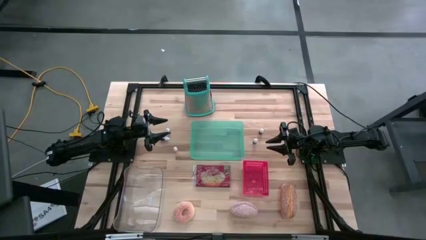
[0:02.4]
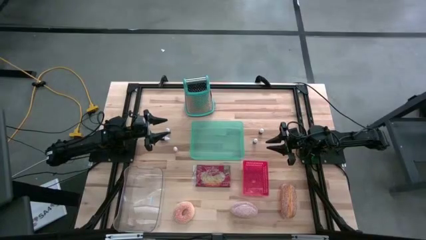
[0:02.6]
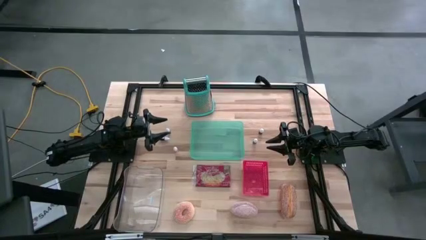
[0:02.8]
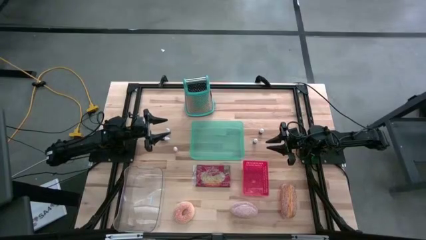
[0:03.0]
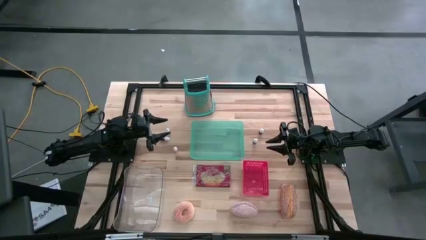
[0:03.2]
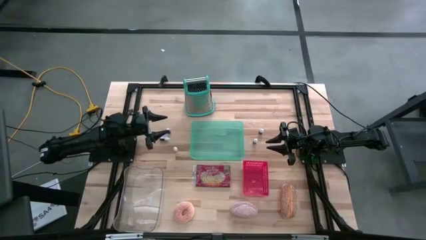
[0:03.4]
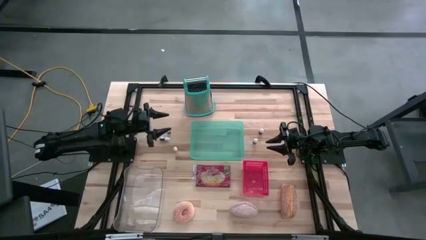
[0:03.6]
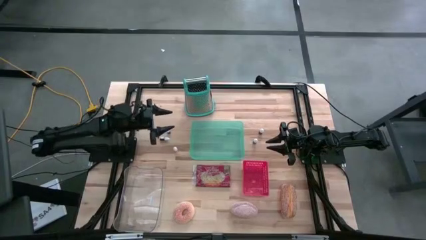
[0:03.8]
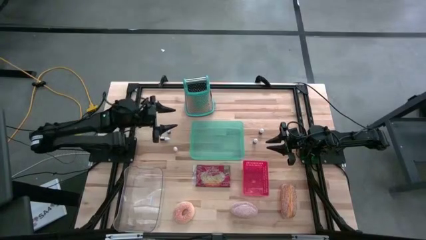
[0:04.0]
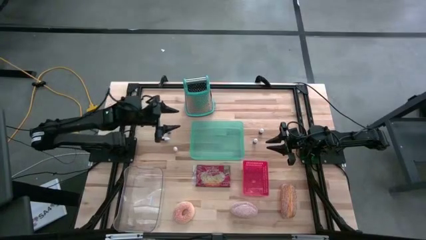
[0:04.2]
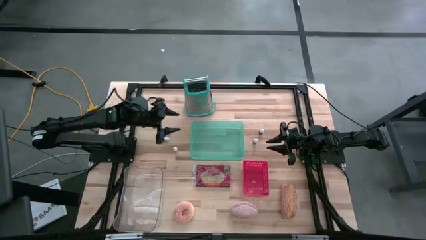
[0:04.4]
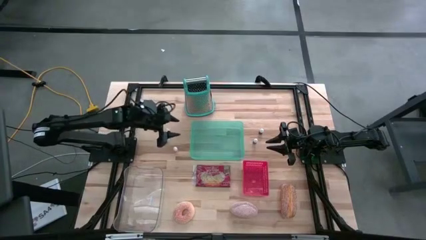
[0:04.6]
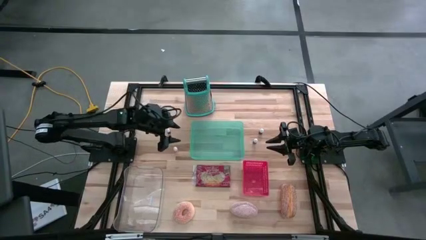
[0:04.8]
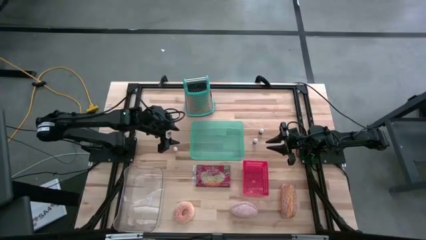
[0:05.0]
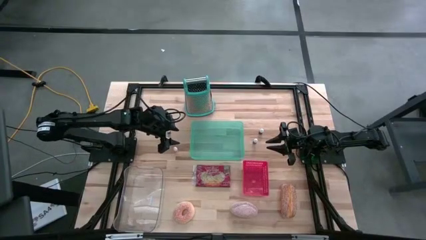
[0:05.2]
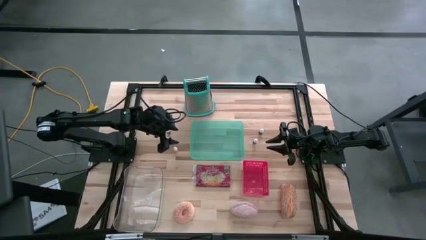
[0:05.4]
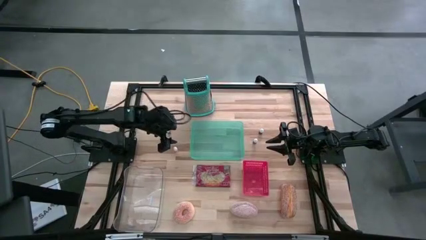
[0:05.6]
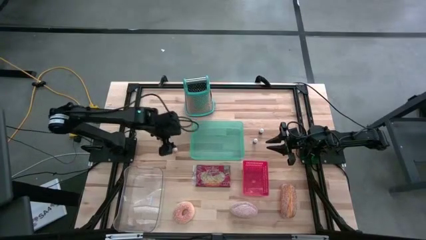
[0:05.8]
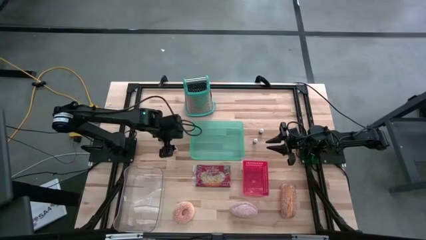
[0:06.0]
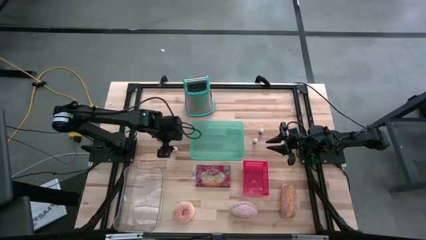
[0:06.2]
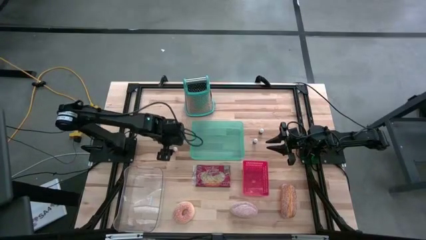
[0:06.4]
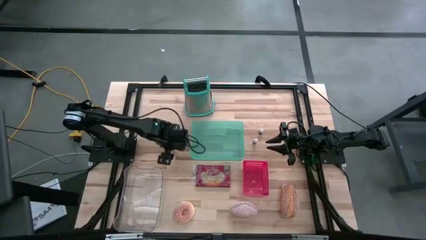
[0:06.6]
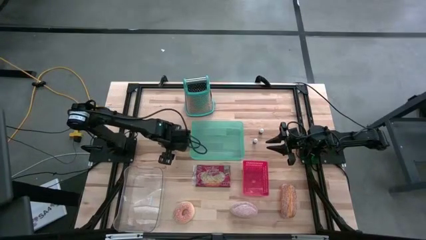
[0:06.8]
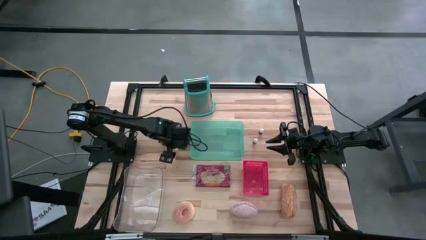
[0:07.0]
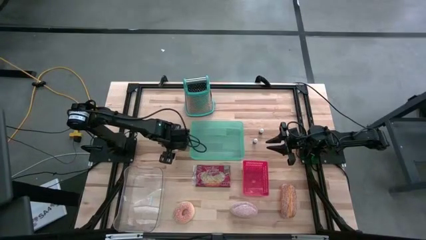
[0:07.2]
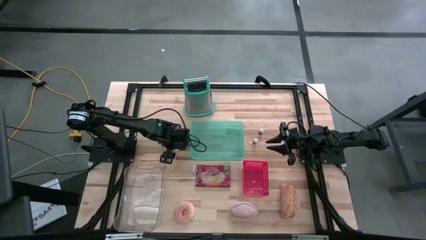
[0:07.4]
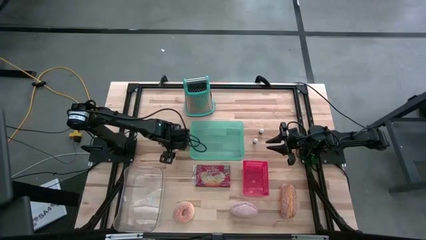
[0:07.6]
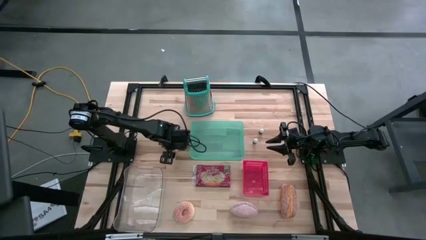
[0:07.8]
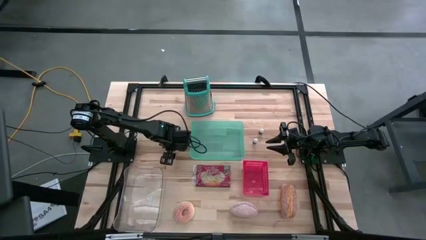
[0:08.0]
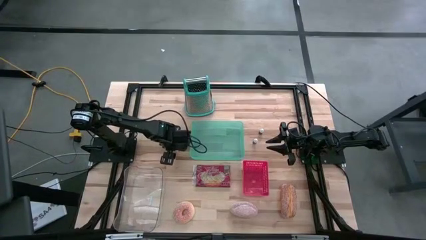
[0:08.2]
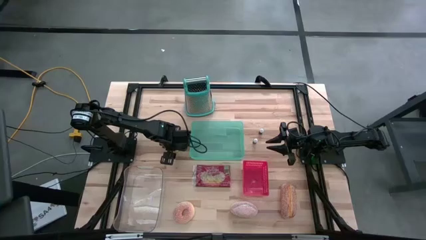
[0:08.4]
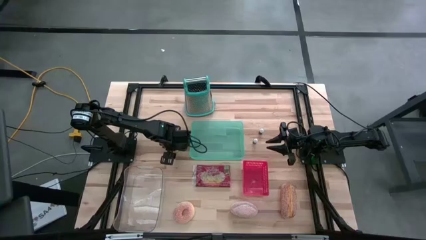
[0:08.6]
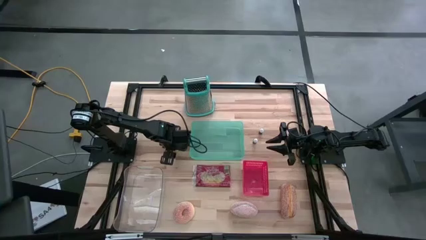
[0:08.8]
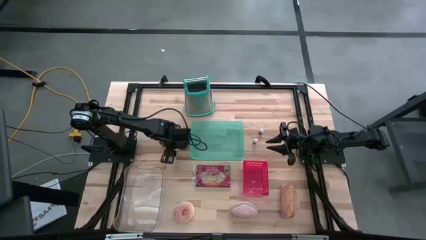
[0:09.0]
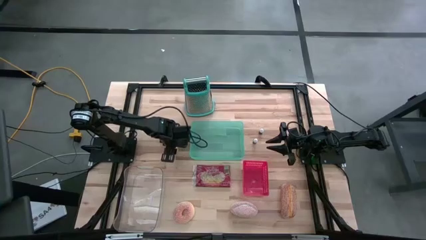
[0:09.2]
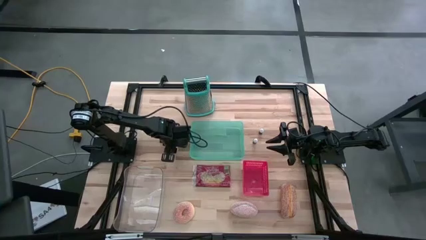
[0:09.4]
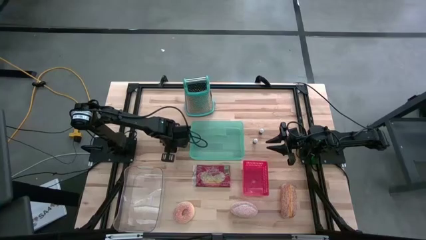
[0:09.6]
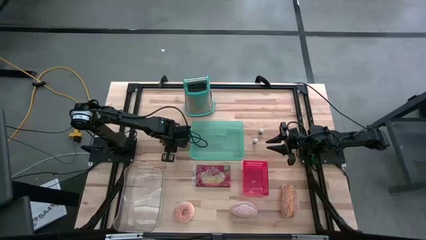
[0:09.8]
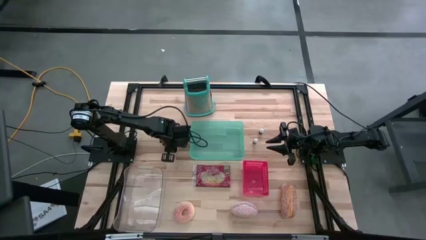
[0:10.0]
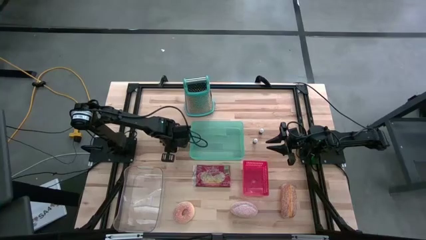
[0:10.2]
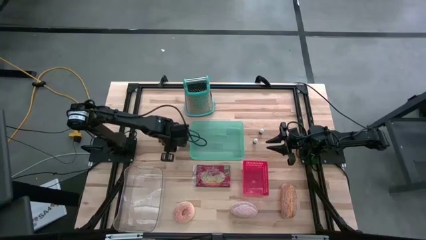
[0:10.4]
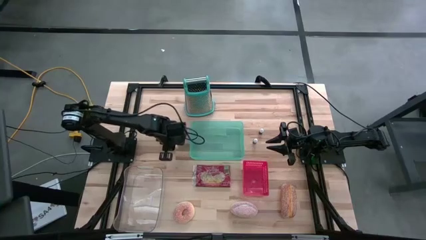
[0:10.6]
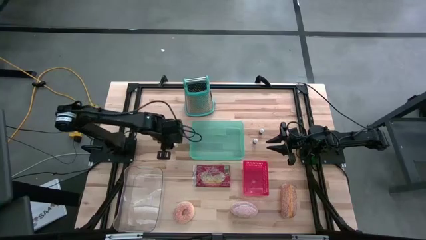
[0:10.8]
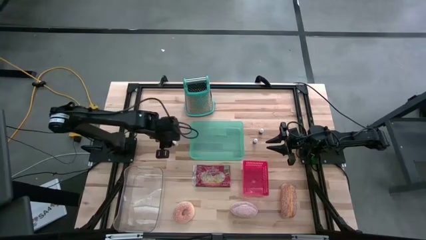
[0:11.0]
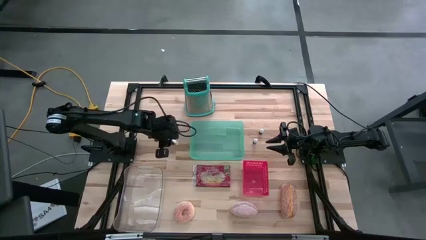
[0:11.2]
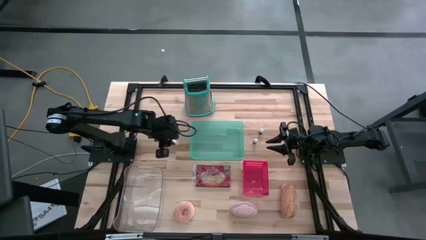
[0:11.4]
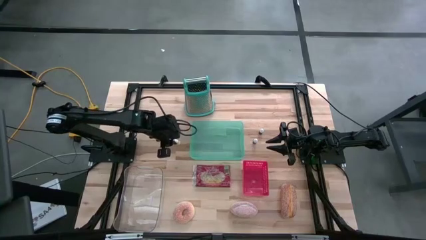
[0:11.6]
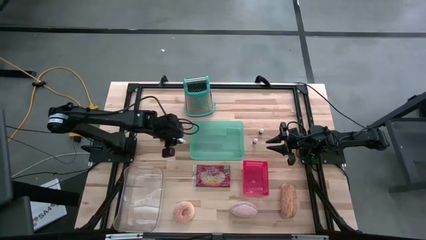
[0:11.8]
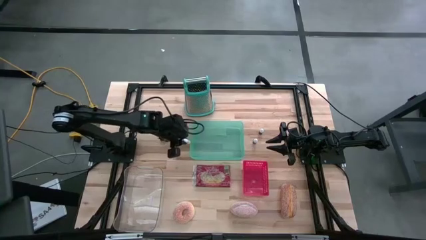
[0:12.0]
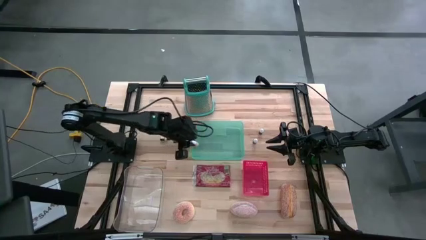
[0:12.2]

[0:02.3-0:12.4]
Task: Pick & Place Food Item
Put the orange food coloring bottle into the red bin

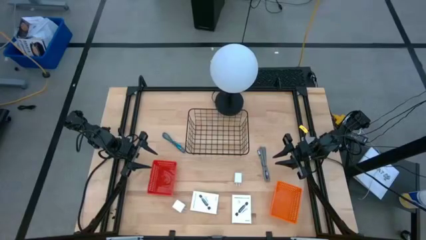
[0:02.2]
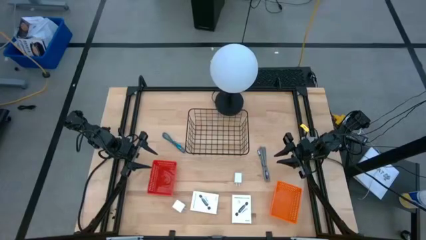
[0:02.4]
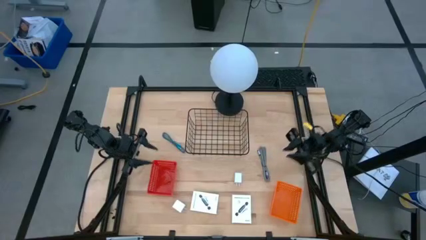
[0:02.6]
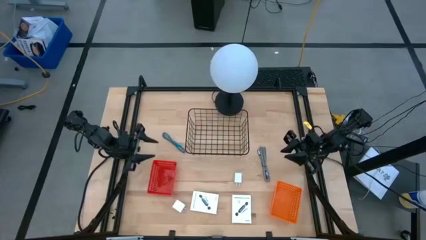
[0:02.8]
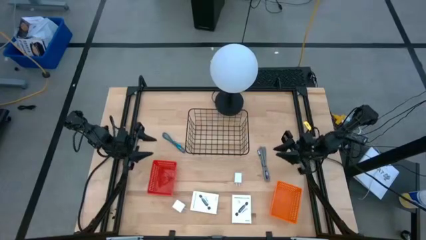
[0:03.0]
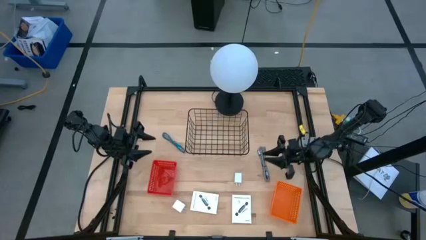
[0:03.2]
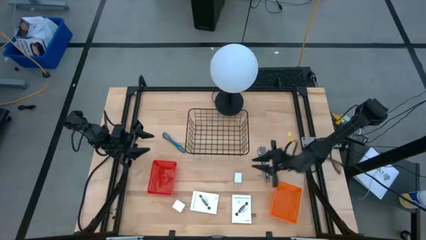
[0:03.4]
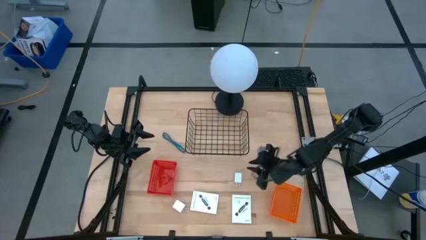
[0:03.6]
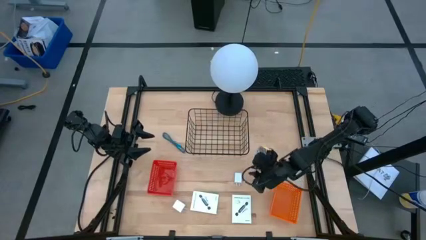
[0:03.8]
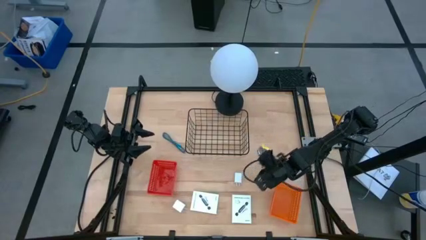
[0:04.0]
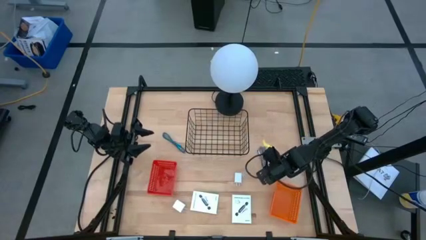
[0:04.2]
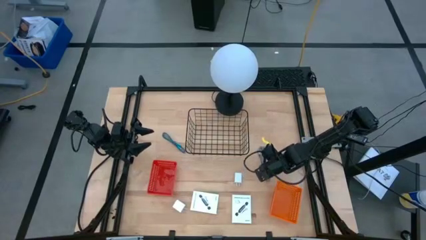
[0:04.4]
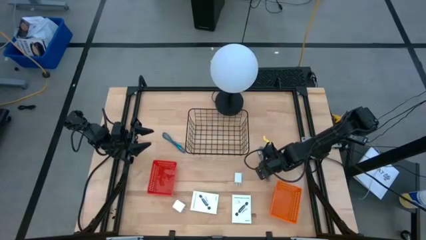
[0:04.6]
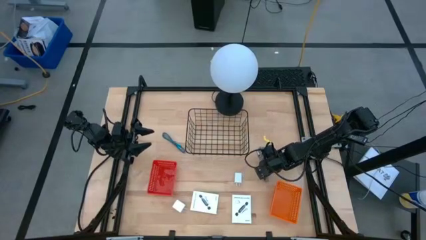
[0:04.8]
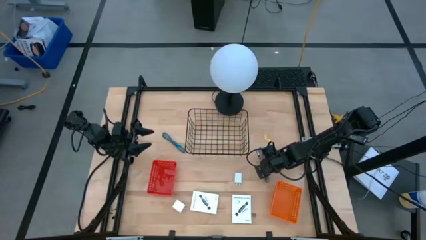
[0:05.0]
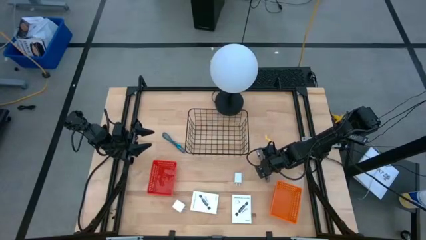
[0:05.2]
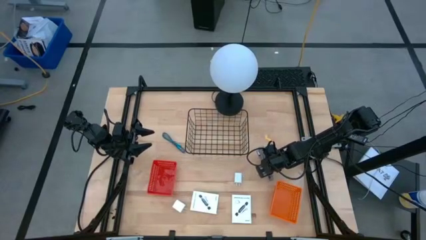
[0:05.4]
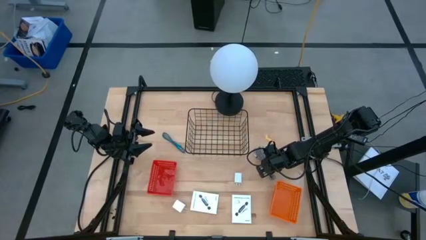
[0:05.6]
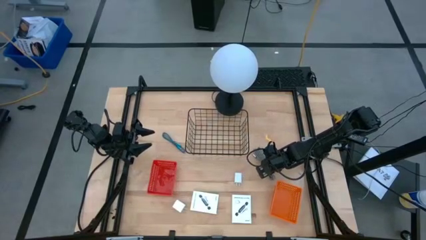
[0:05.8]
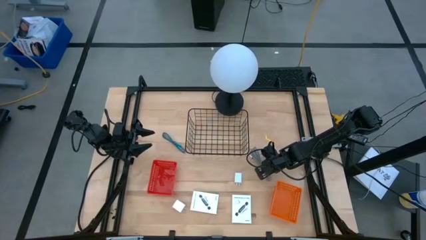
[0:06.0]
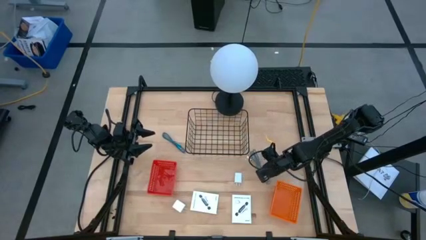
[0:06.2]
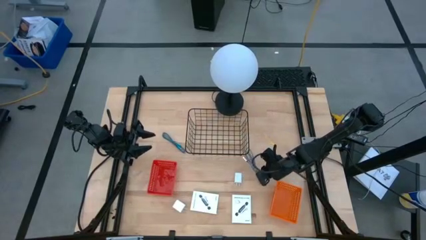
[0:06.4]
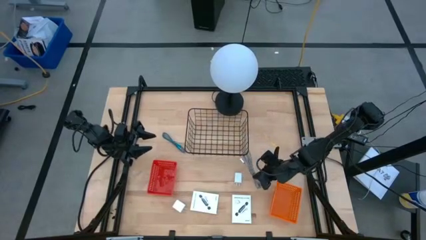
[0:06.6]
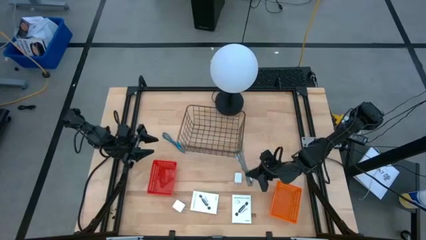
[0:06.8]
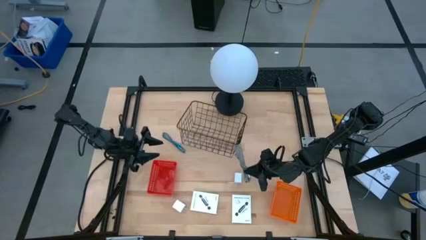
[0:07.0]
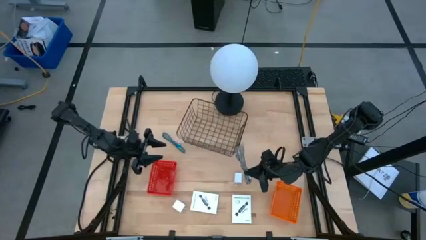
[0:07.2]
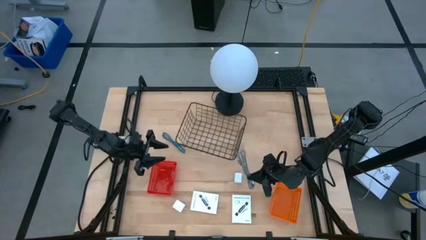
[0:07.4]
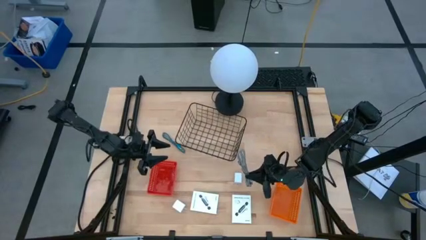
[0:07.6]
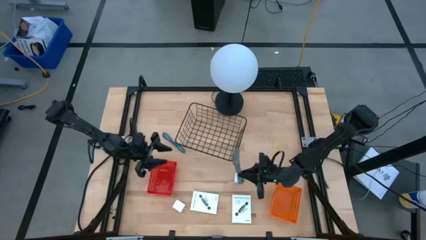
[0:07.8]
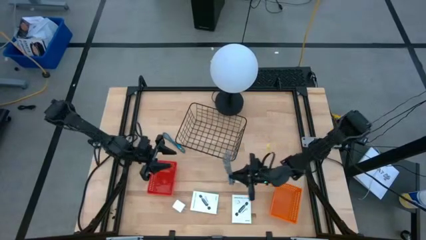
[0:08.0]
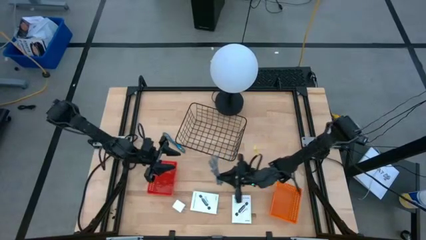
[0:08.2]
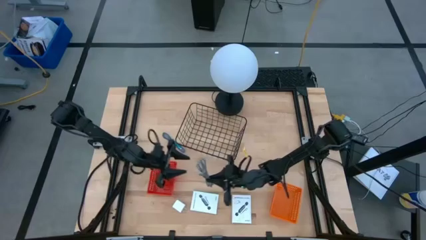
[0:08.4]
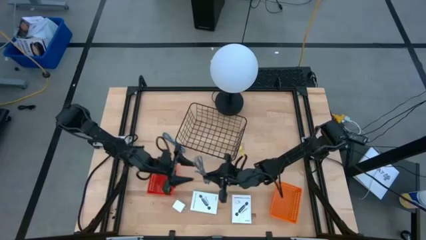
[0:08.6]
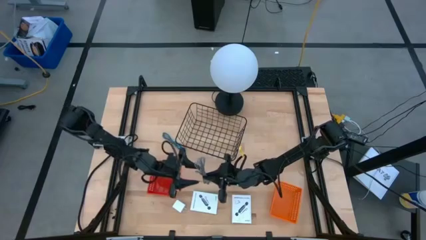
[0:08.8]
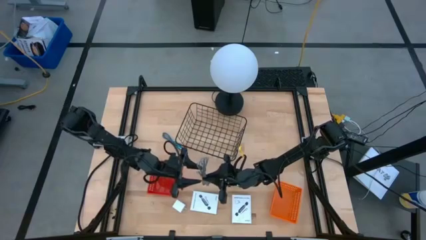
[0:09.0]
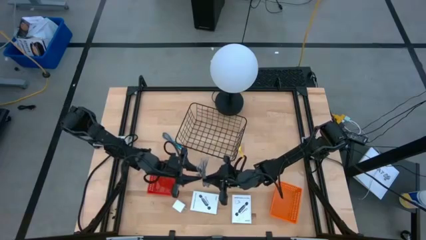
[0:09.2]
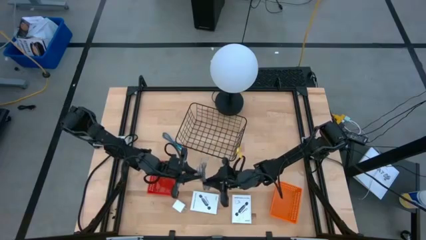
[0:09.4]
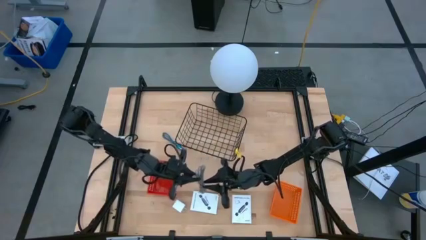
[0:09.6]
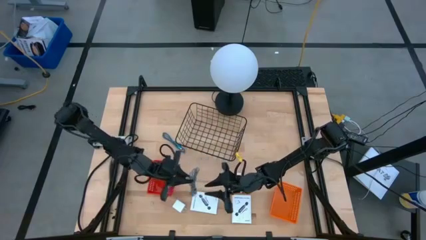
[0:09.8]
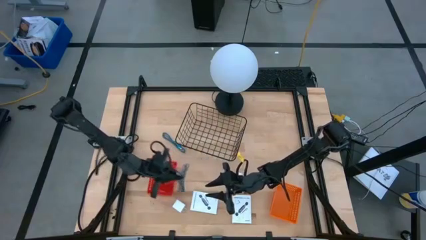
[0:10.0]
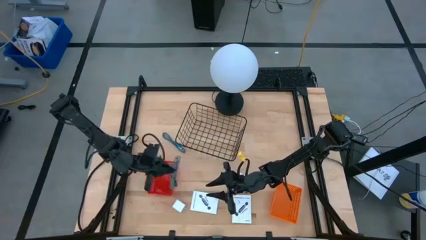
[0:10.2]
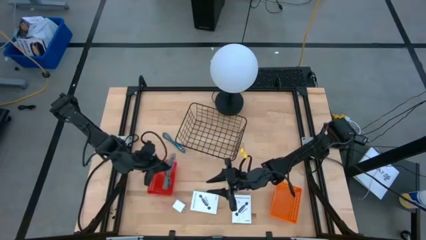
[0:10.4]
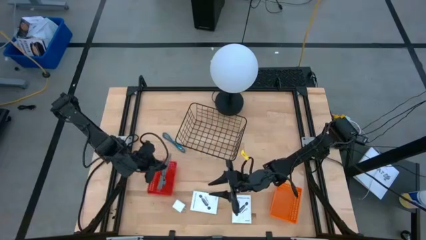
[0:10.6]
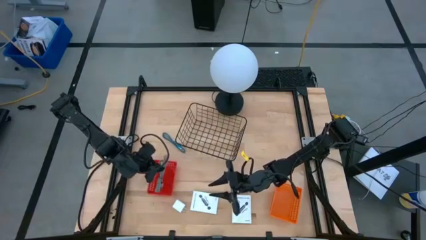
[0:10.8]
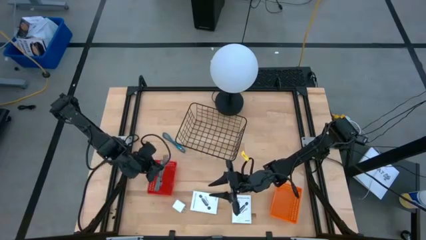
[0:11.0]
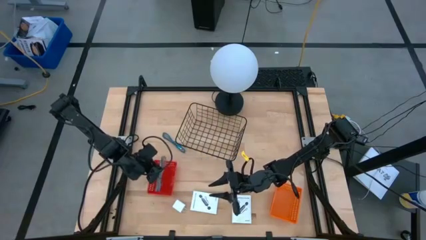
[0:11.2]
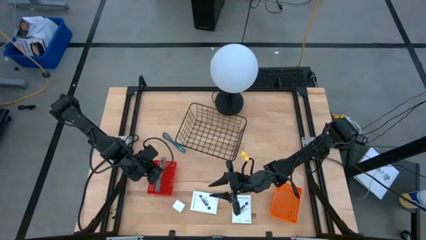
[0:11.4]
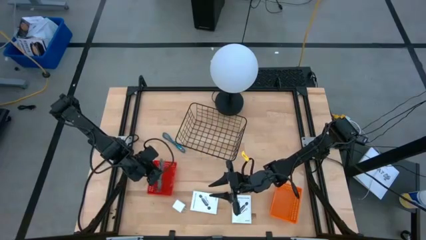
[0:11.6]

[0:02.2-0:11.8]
Task: Pick and place items into bin
Put the black and white USB cable into the red basket
